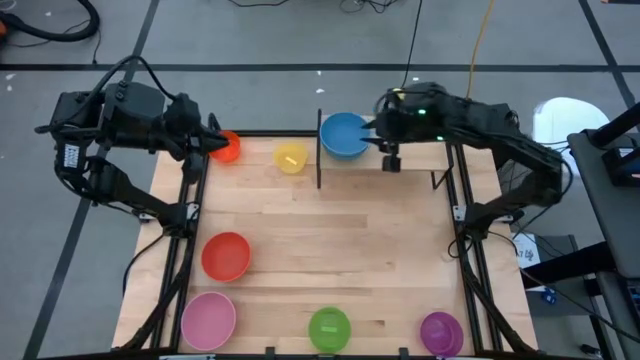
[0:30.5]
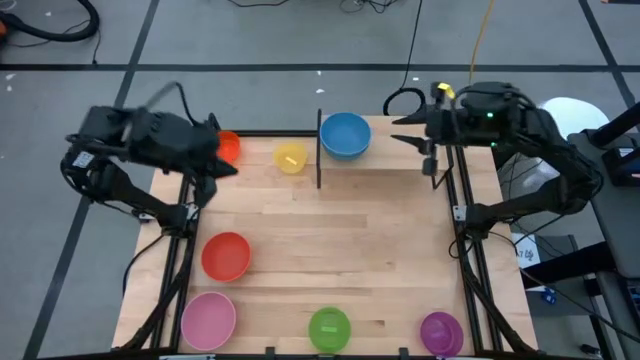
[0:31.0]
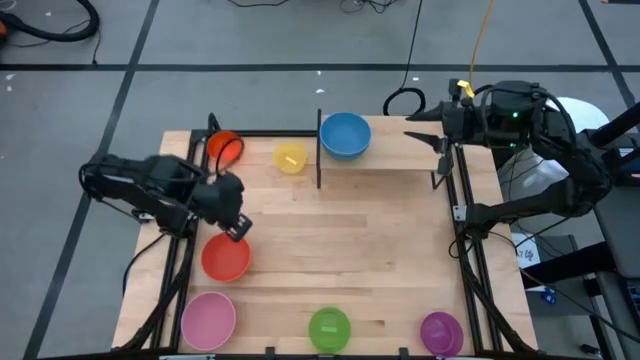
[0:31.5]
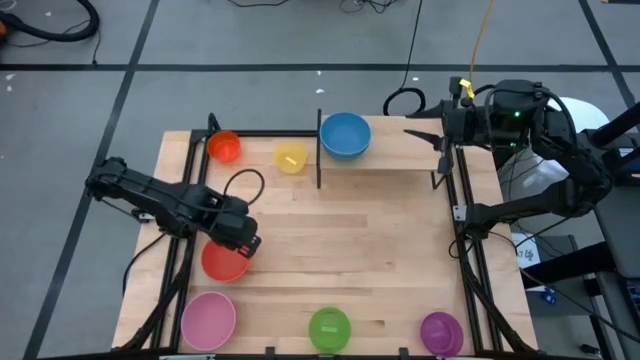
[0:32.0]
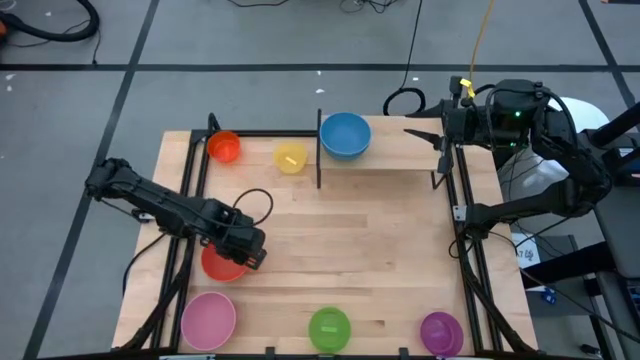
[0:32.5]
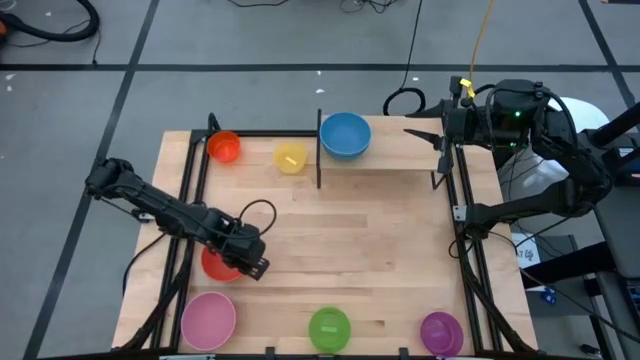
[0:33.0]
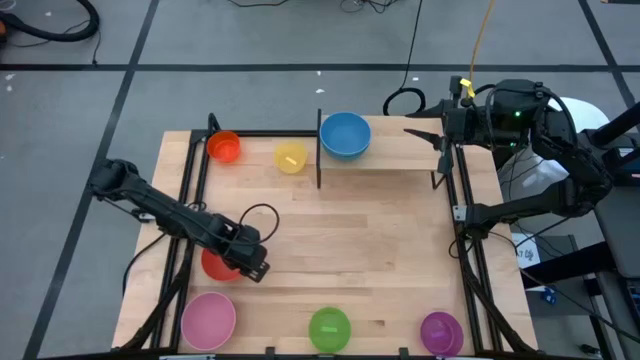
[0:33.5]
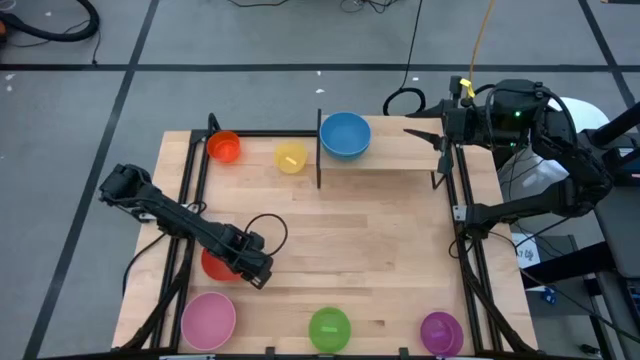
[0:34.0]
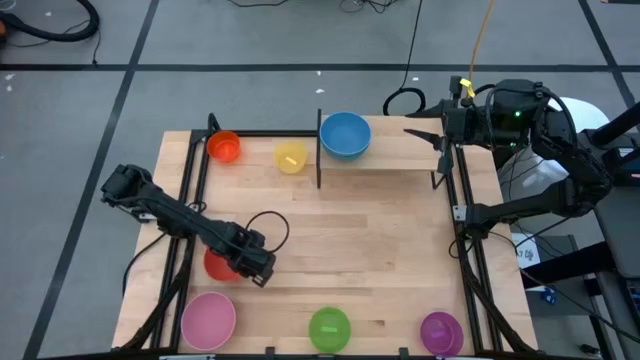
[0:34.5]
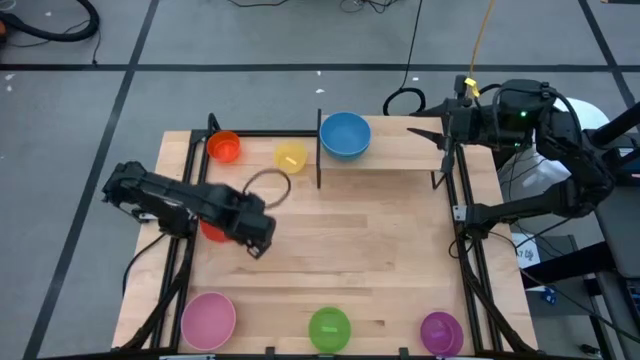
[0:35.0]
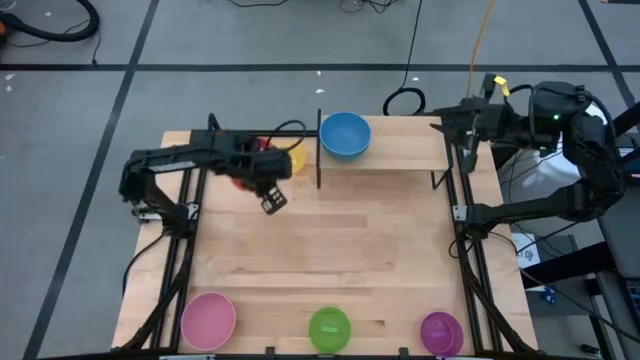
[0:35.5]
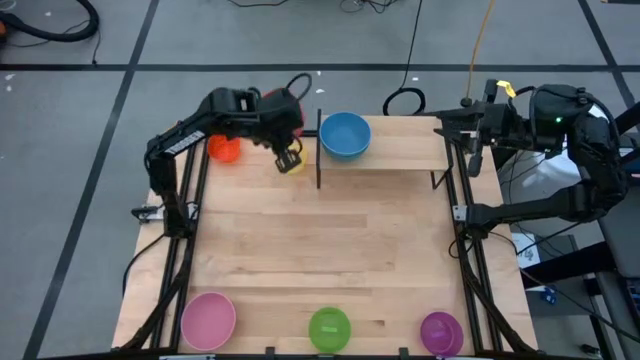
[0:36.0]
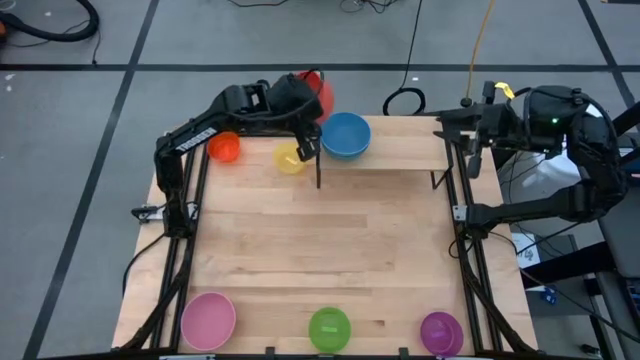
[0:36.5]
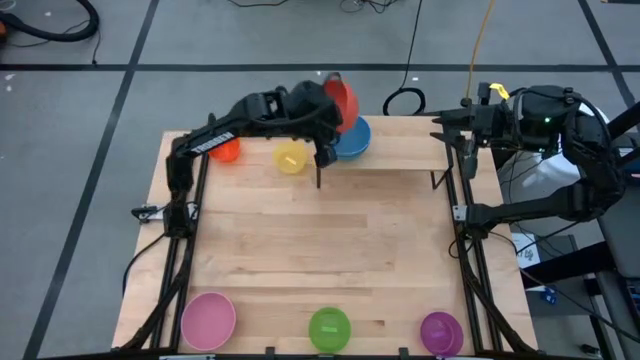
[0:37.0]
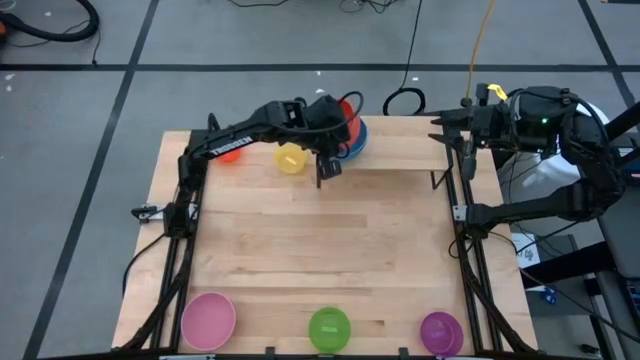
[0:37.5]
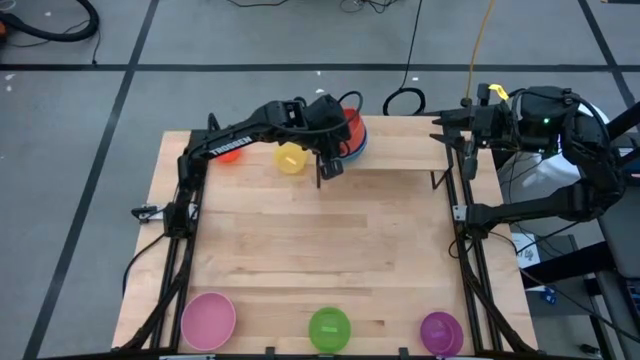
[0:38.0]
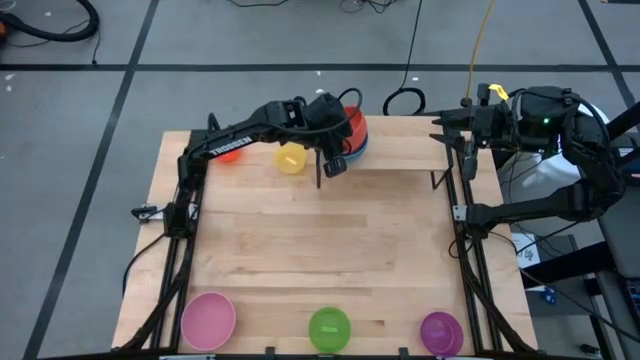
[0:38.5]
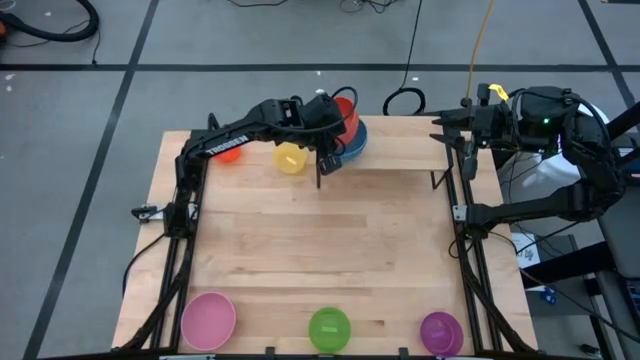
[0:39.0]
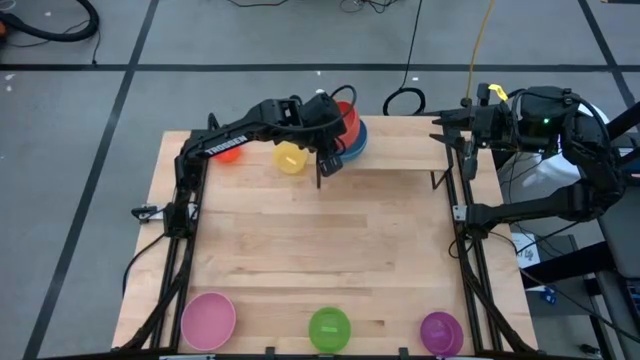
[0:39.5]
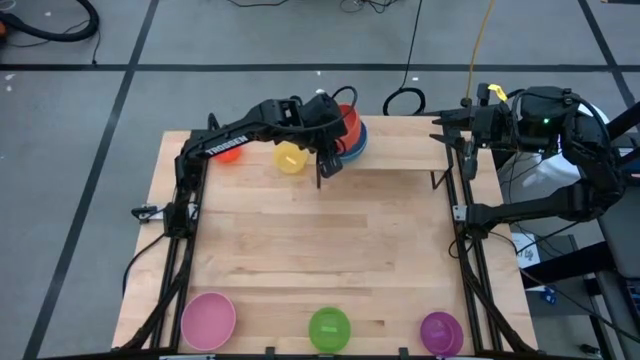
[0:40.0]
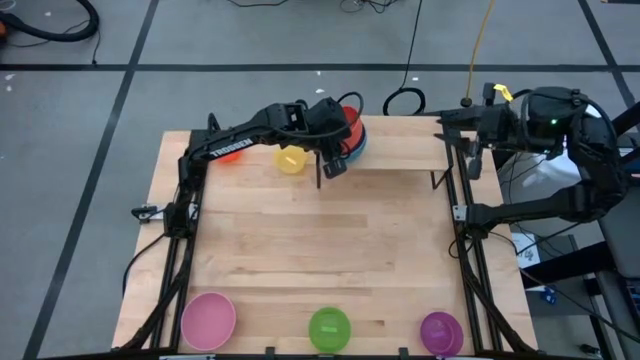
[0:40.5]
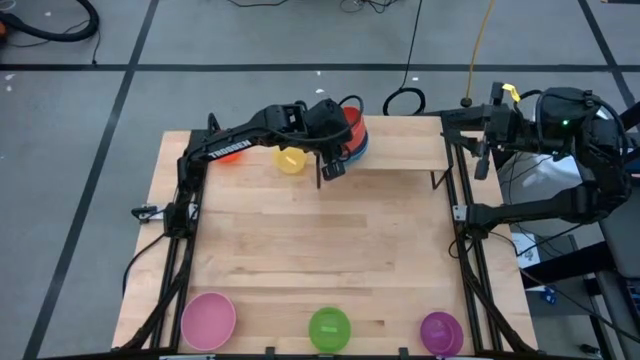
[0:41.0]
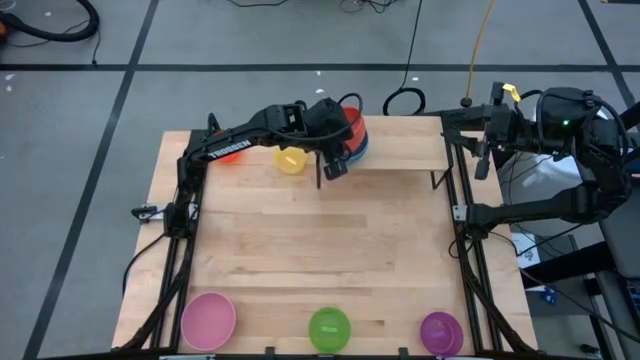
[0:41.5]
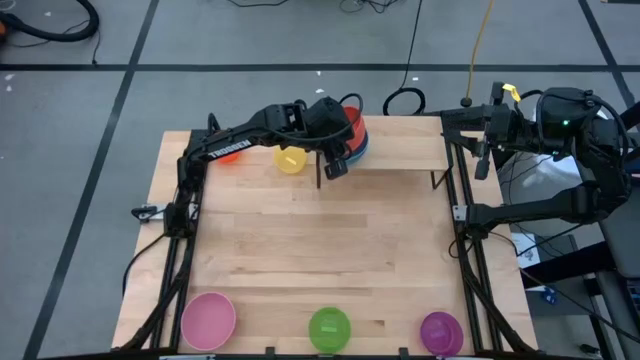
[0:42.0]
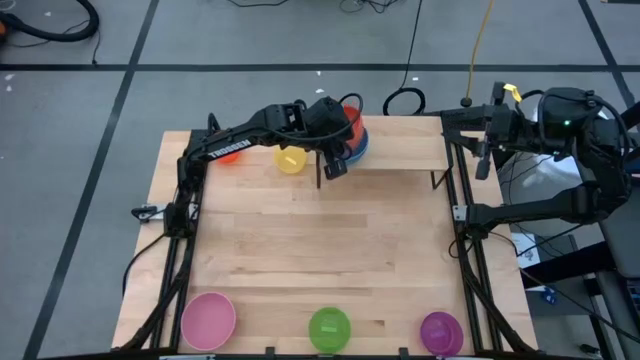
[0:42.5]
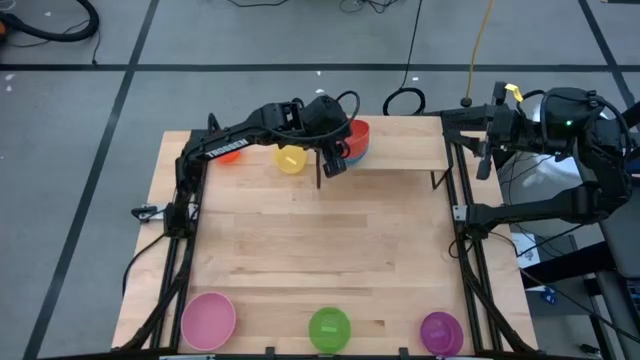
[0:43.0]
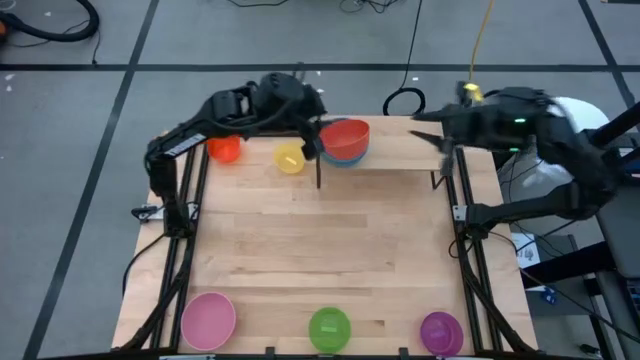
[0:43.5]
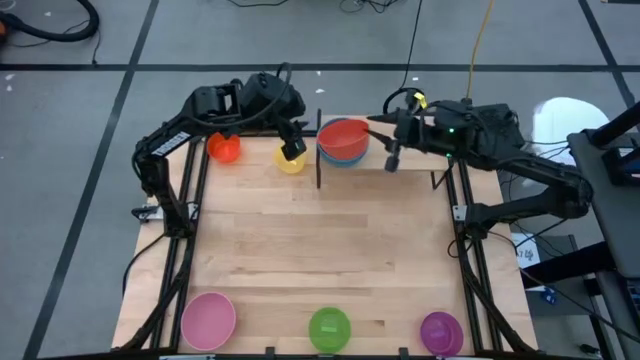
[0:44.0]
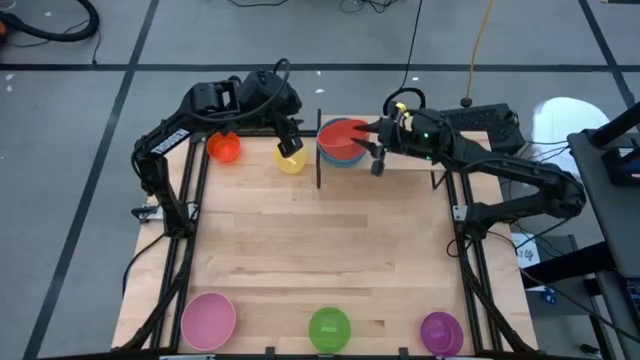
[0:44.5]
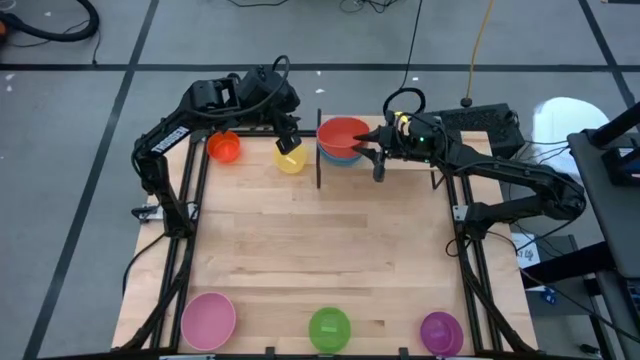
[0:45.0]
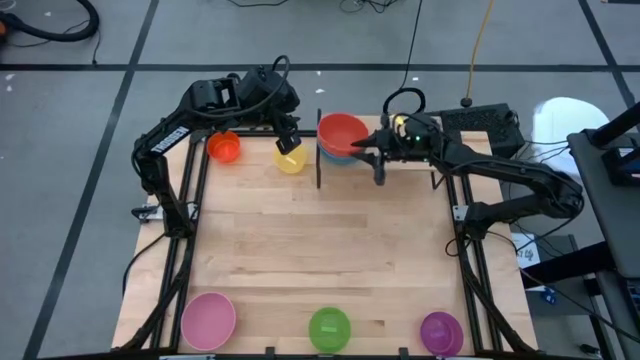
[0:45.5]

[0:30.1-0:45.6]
Task: Place and stack bowls onto a shelf
Stack the bottom orange bowl on top of the blue bowl on the shelf

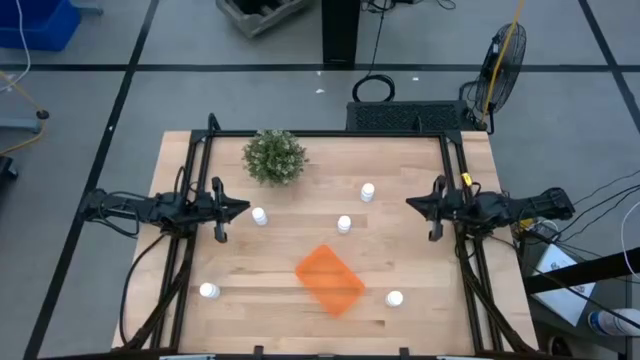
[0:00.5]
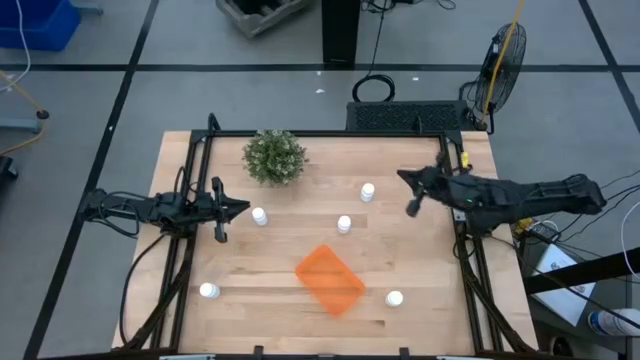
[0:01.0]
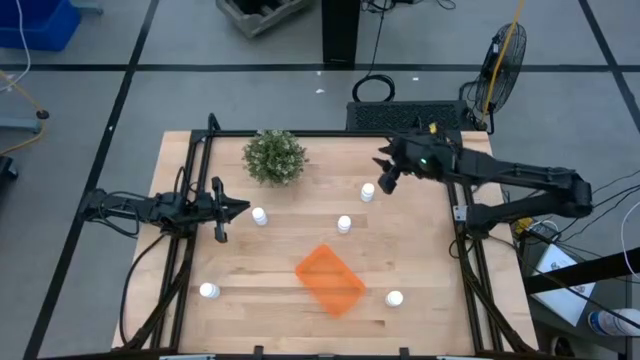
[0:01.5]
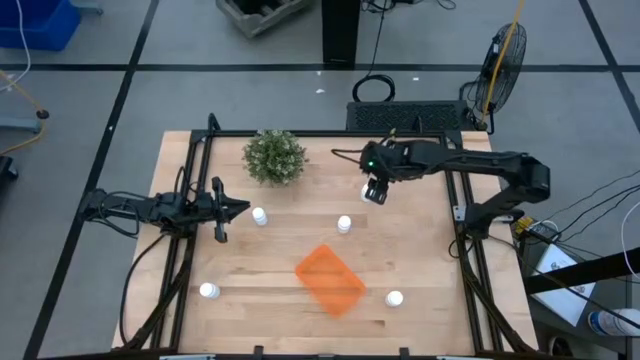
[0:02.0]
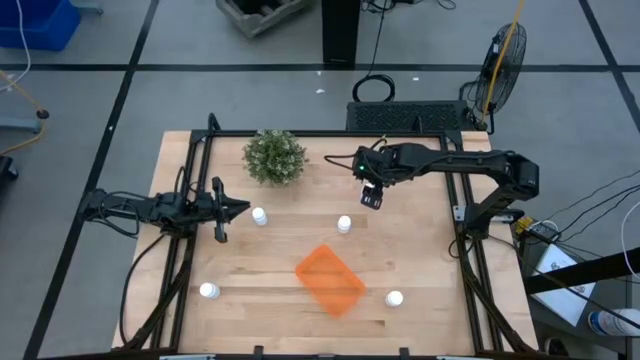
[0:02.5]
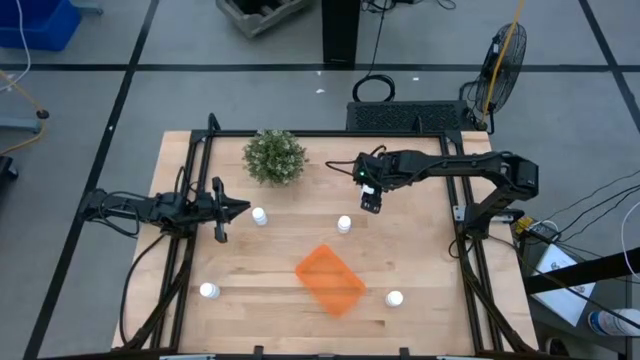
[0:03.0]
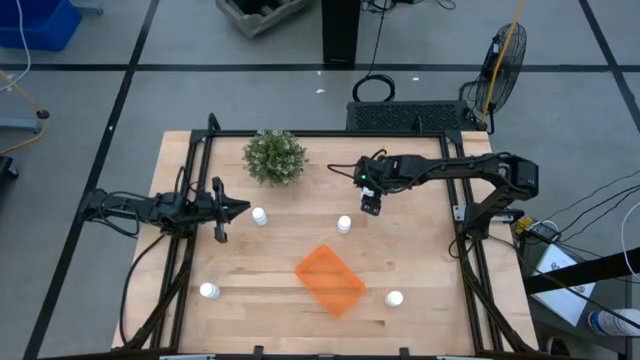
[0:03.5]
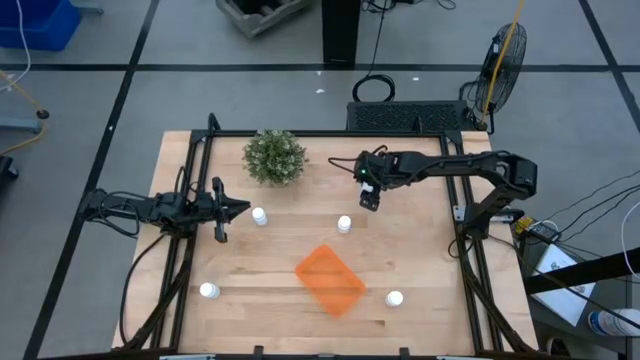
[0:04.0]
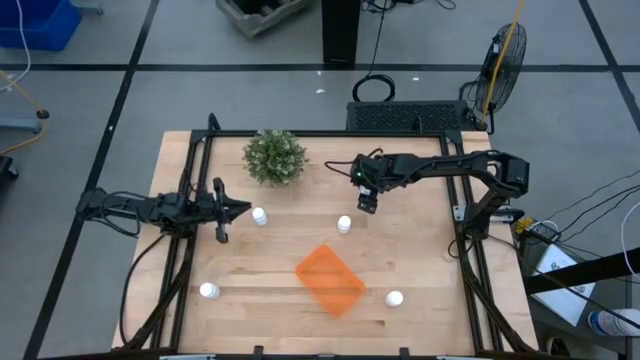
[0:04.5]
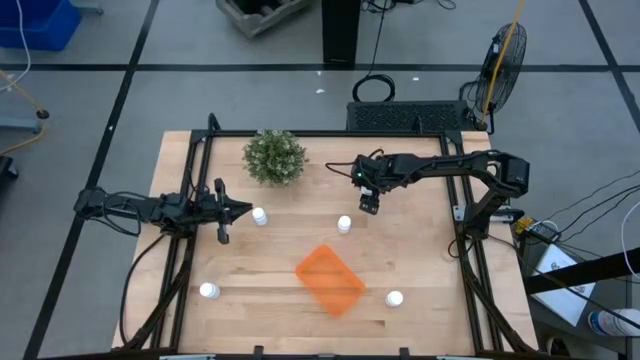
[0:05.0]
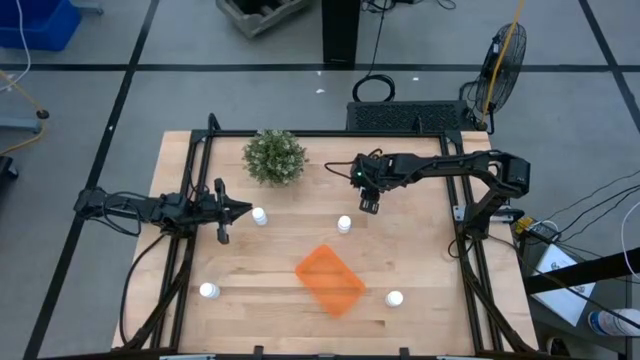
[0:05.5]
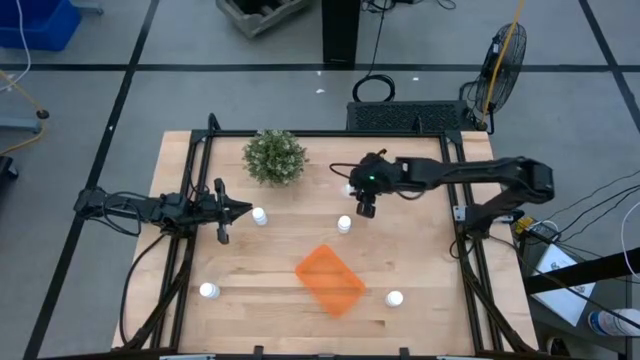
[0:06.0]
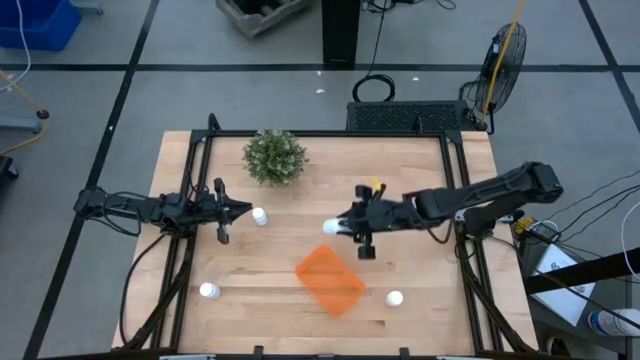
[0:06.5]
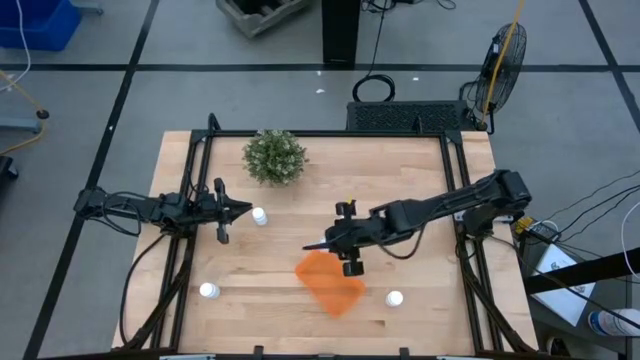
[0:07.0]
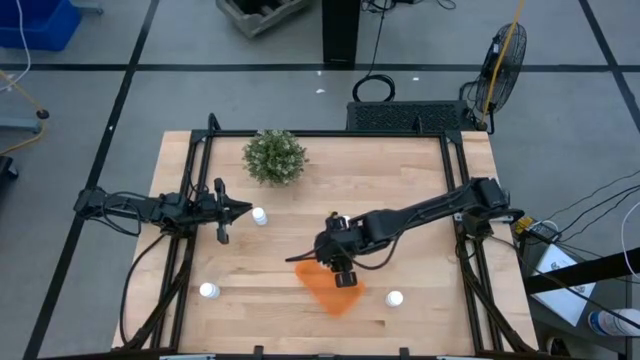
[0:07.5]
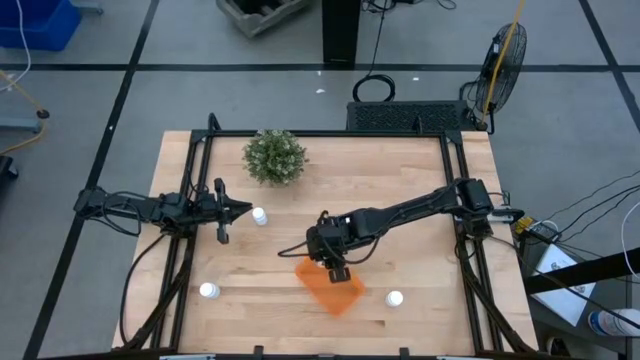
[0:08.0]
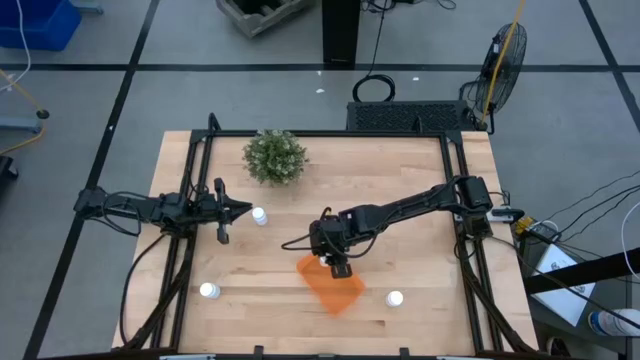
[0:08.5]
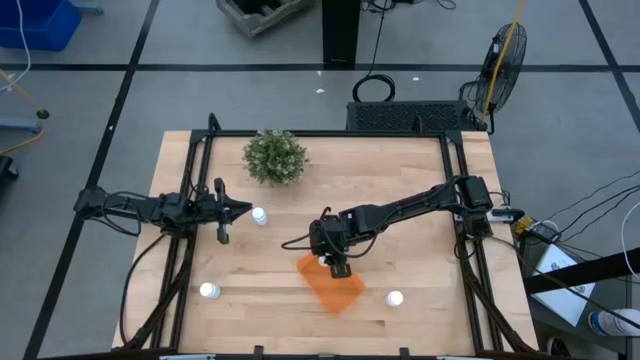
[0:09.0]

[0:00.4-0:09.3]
Task: Pick and place pill bottles into a basket
Put the white medicine bottle into the orange bin
